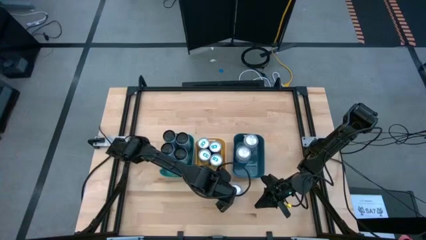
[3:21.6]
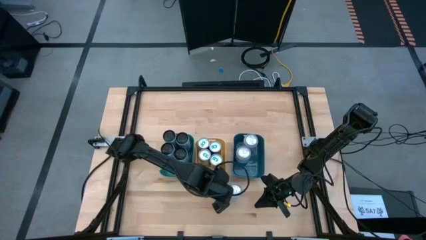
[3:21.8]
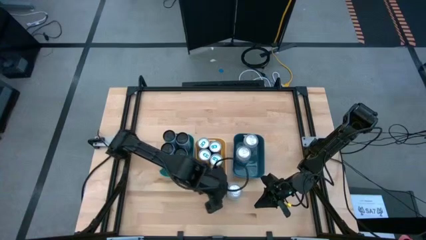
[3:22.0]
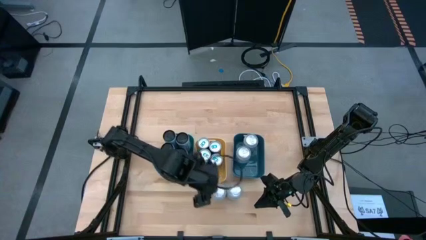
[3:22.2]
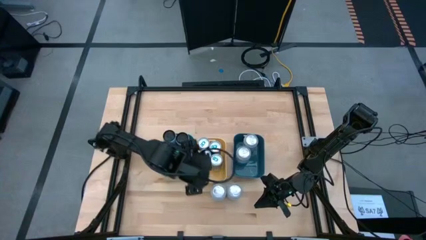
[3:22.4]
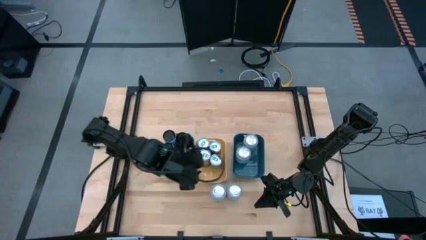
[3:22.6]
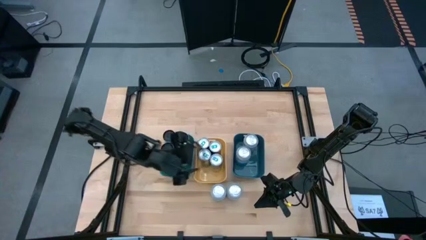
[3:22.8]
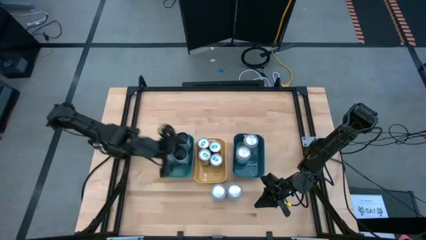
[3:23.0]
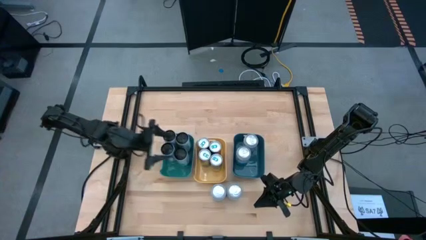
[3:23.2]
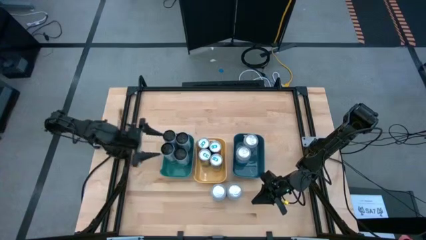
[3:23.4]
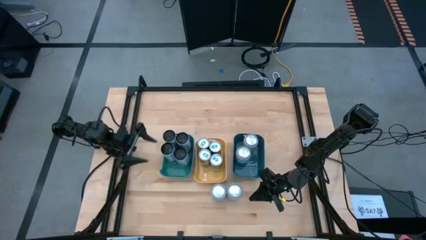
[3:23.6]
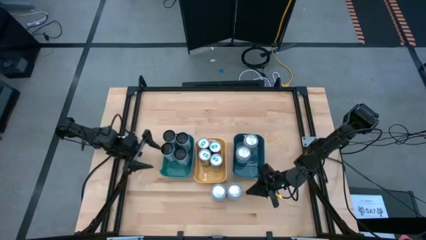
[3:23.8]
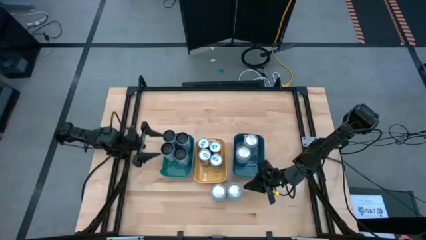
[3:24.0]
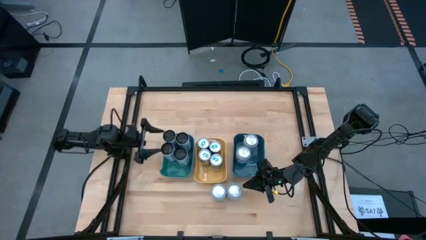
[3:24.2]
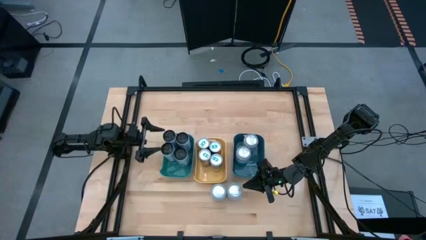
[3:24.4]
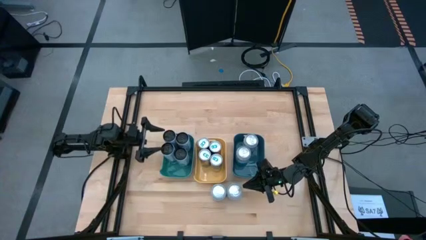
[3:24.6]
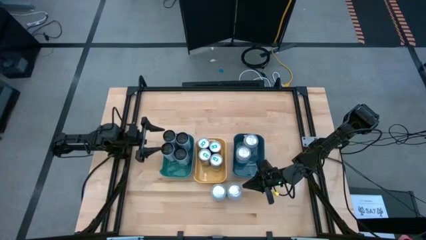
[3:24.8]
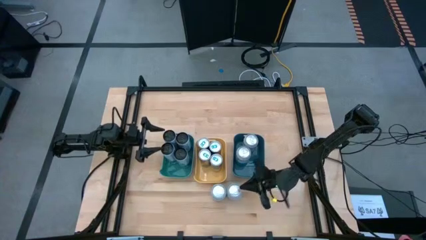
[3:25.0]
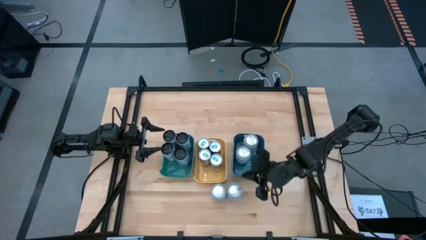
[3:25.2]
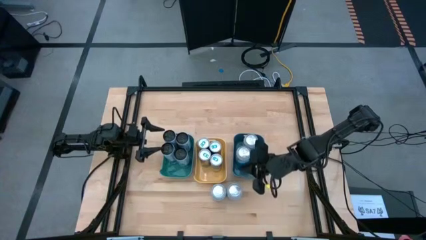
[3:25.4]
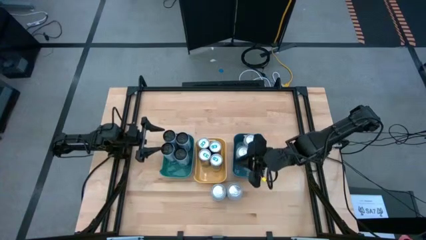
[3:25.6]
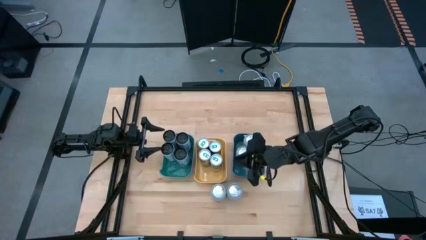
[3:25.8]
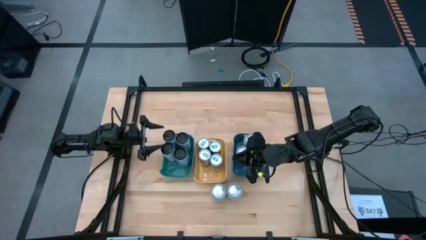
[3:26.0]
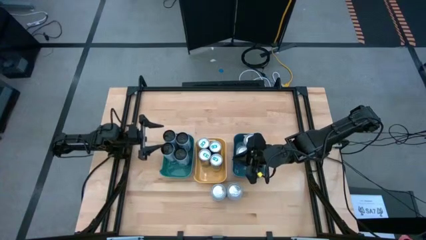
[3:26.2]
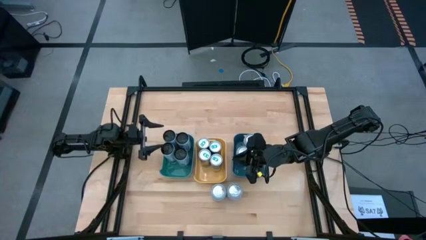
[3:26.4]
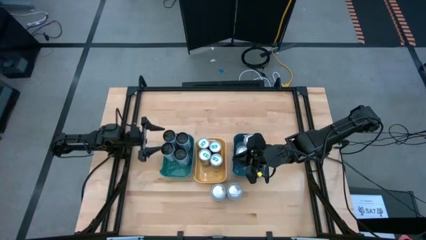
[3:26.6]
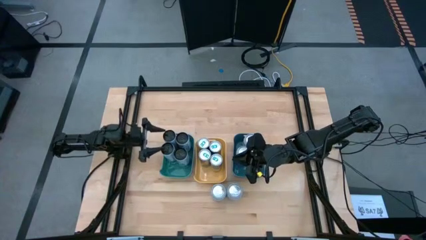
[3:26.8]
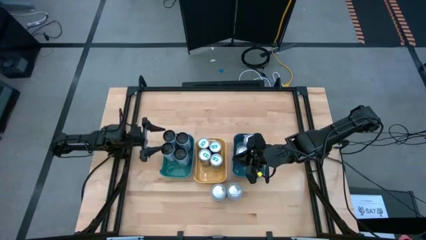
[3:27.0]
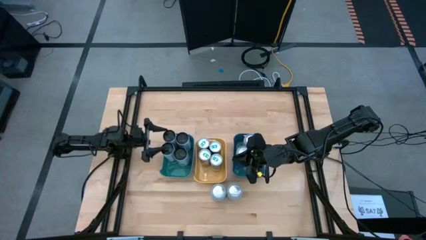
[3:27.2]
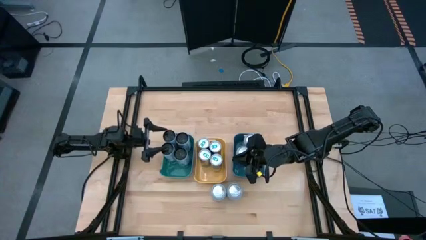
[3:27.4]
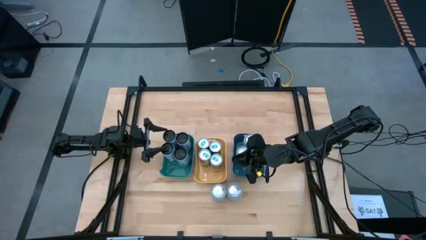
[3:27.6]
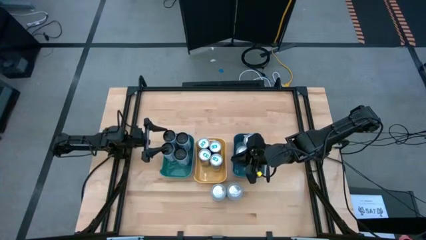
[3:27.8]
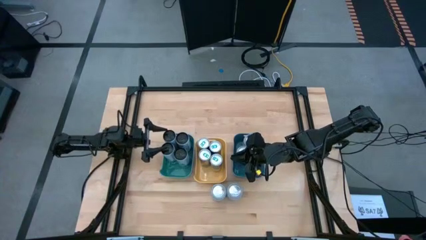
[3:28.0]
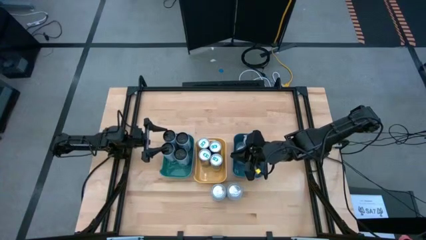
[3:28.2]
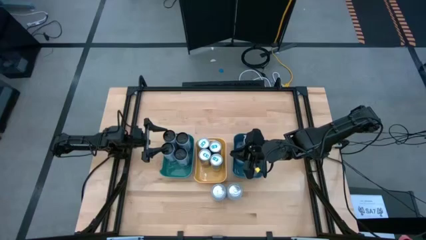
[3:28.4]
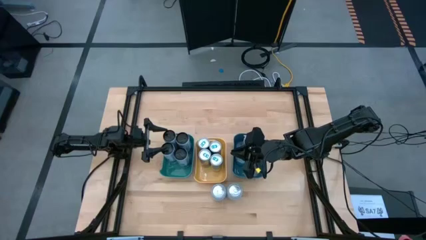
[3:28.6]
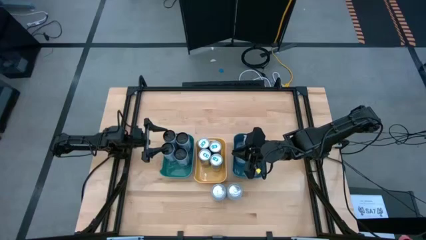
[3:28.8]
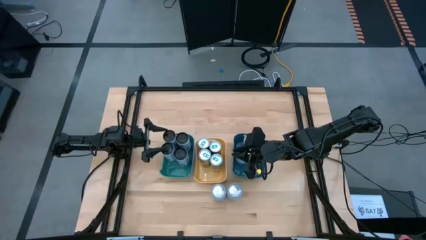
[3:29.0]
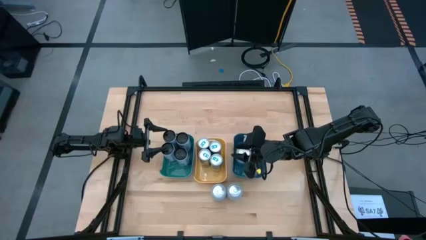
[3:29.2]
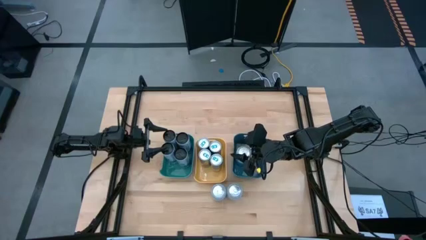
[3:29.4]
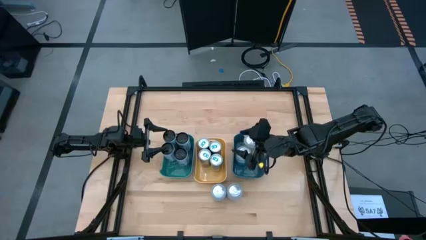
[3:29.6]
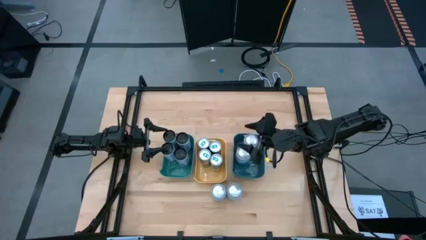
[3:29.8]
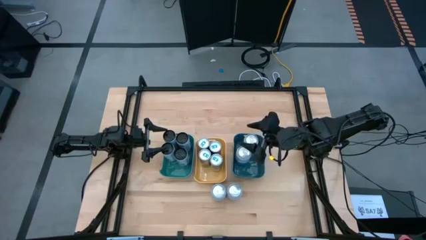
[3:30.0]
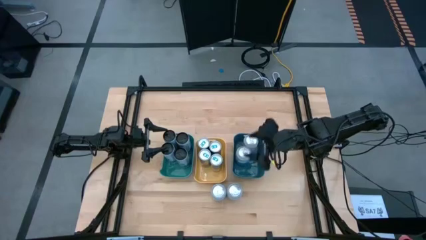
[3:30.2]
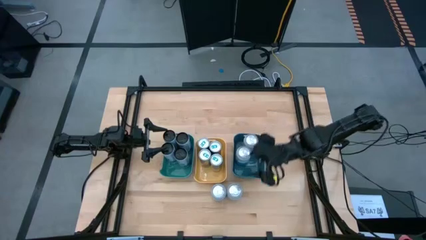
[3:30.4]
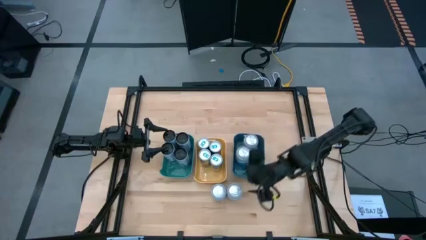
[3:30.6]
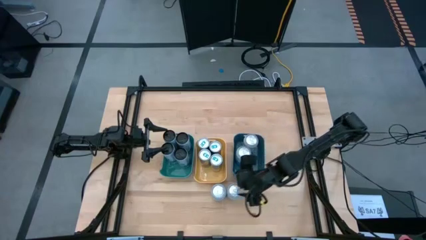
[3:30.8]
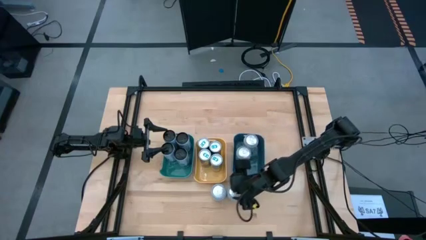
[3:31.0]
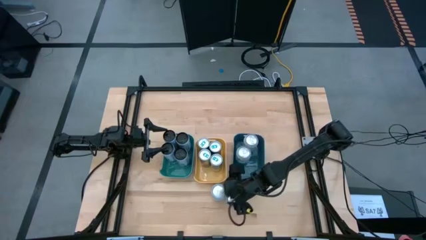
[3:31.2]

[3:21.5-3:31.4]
Task: Sort soda cans
Put the right silver can into the dark green bin

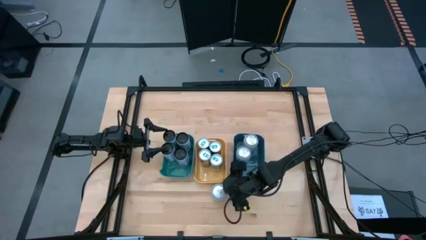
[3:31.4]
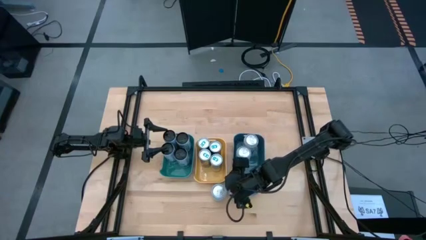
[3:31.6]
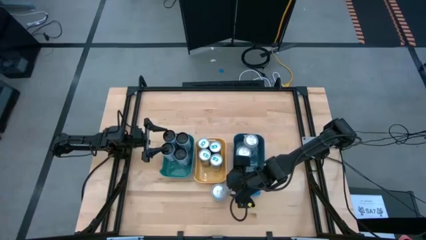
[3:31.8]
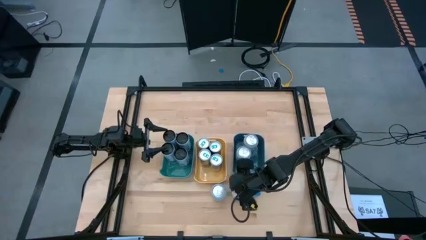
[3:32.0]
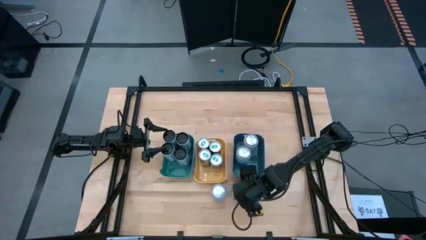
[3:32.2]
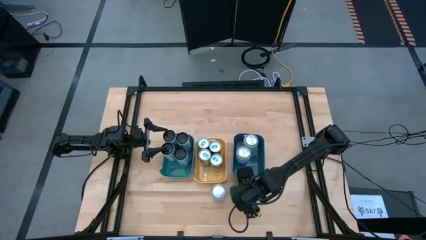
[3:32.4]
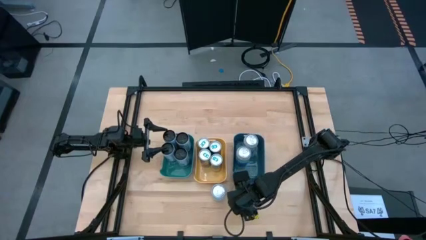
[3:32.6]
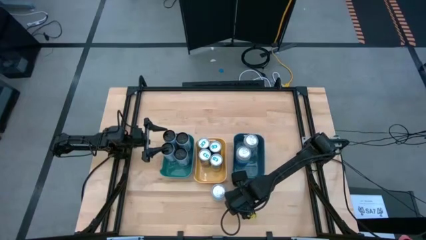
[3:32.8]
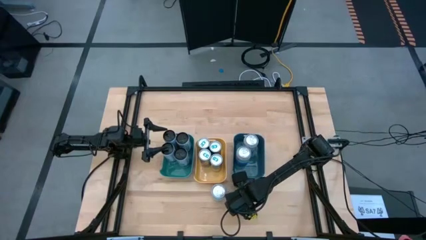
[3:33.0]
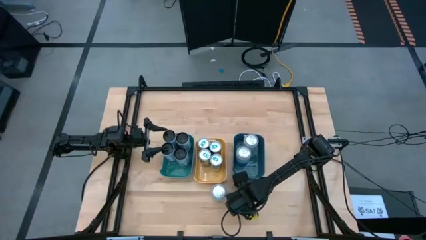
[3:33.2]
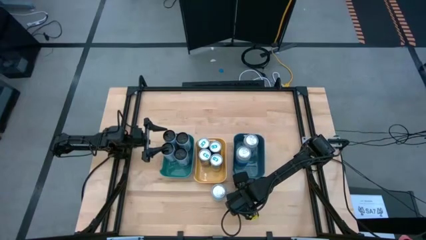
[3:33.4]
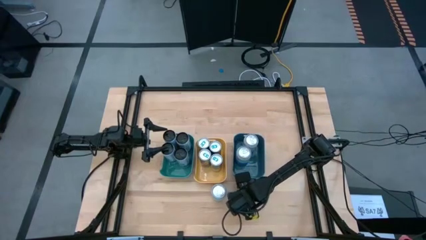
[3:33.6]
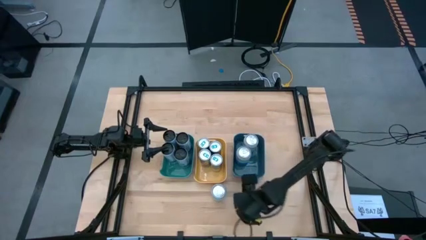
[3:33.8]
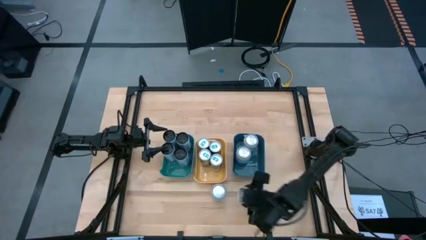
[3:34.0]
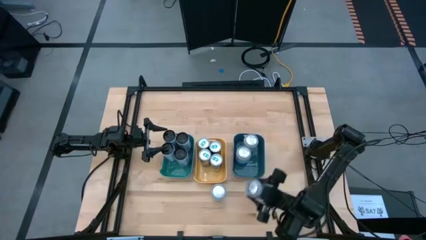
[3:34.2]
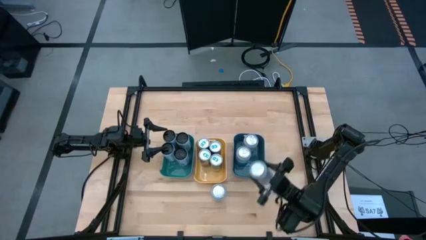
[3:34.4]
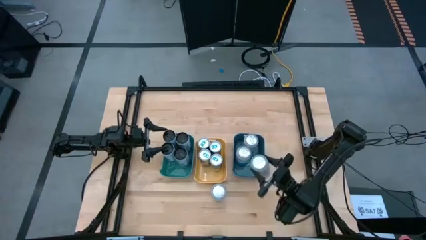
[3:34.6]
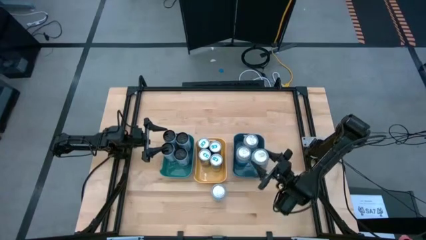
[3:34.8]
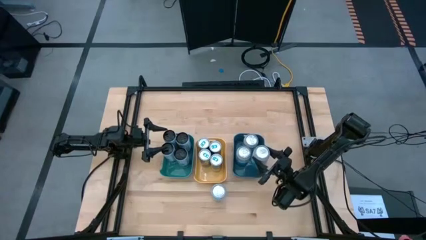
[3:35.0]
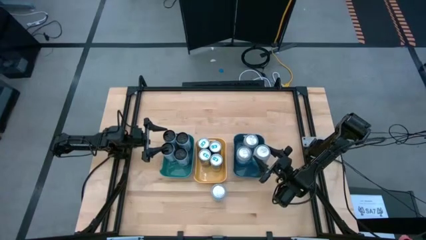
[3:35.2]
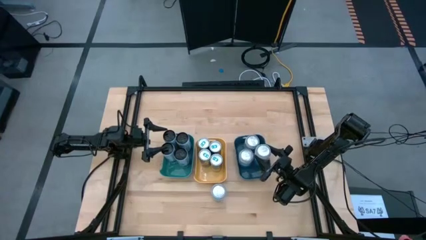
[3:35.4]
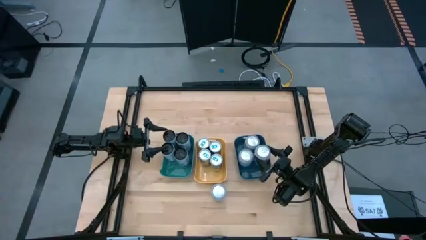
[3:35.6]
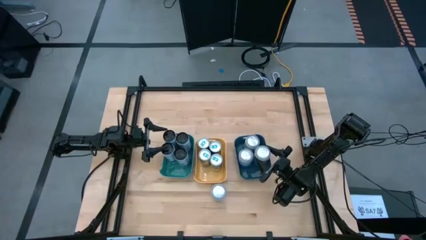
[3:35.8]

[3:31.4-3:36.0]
Put the right silver can into the dark green bin
